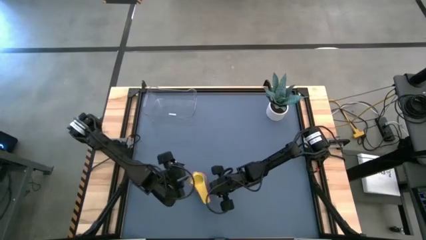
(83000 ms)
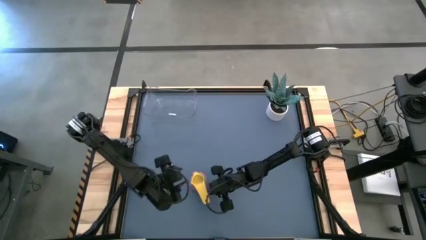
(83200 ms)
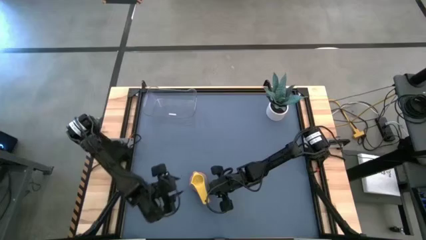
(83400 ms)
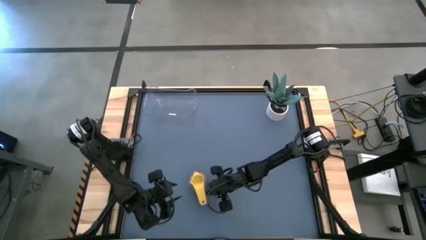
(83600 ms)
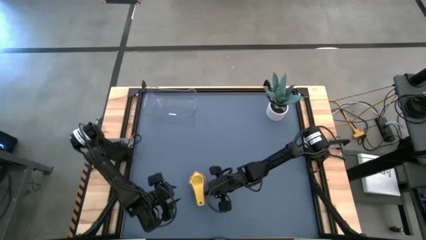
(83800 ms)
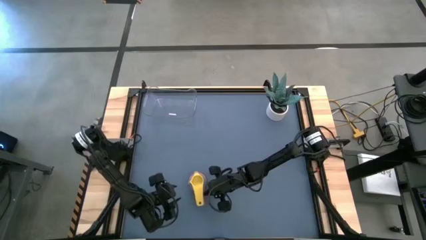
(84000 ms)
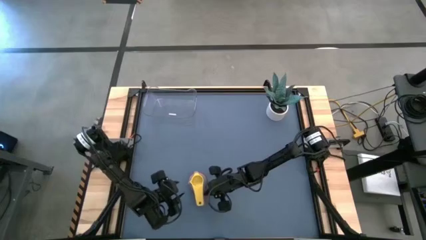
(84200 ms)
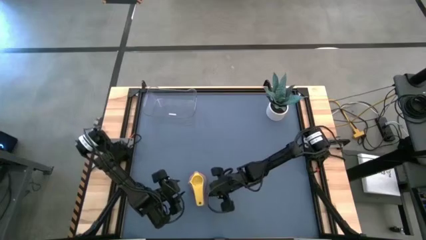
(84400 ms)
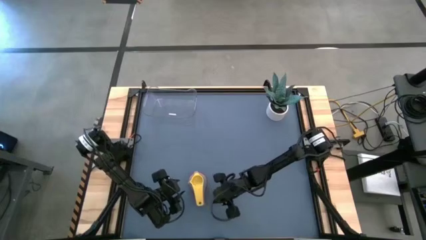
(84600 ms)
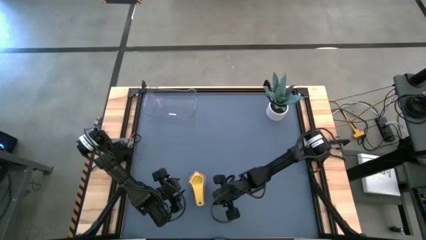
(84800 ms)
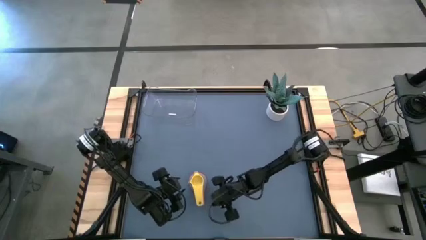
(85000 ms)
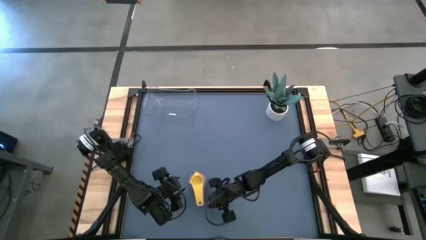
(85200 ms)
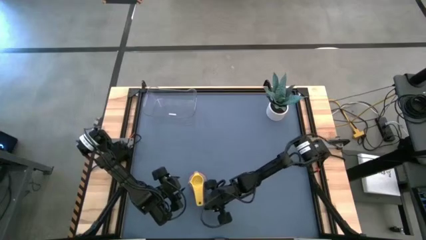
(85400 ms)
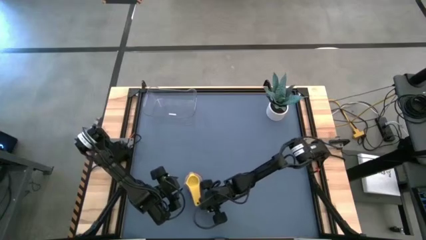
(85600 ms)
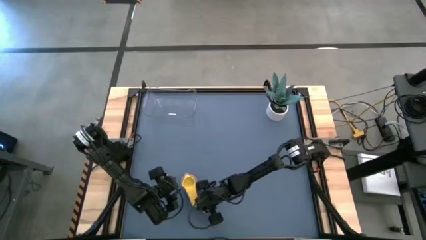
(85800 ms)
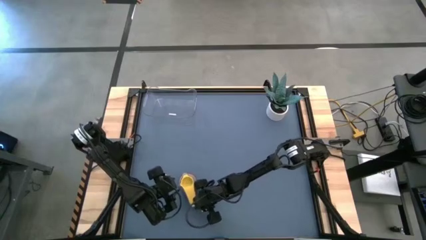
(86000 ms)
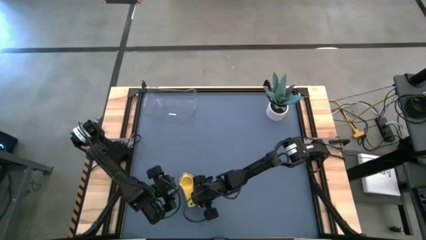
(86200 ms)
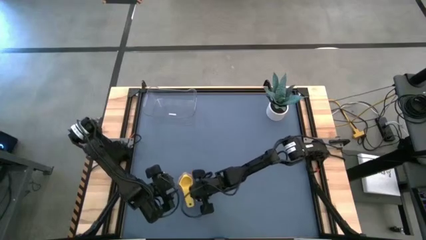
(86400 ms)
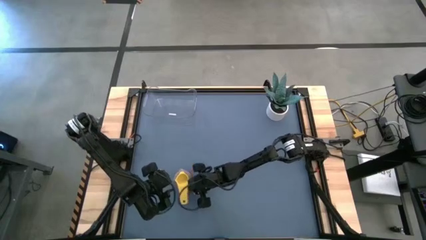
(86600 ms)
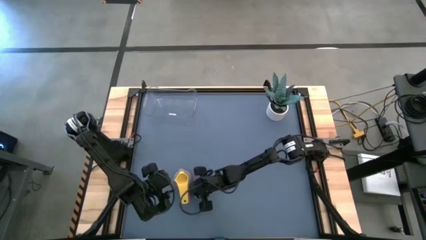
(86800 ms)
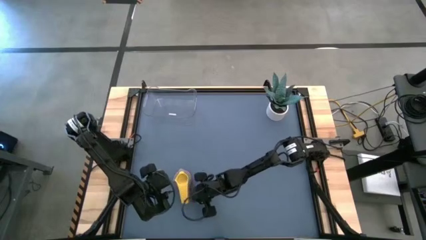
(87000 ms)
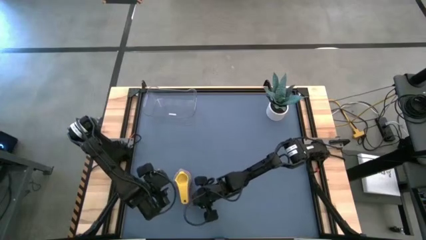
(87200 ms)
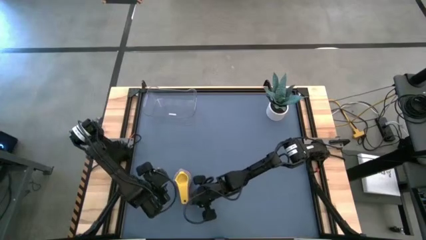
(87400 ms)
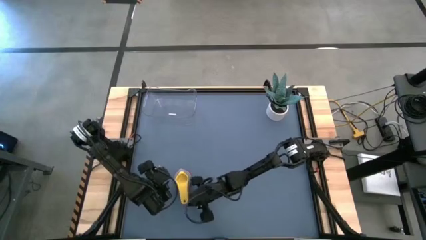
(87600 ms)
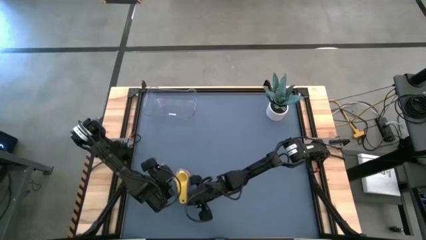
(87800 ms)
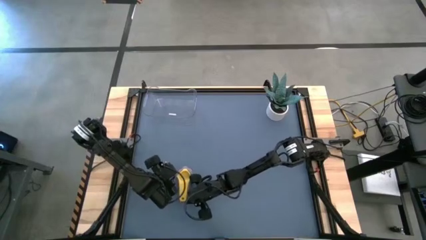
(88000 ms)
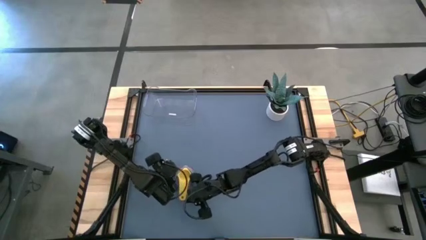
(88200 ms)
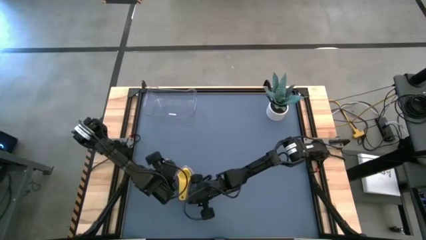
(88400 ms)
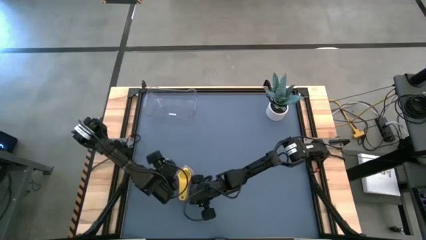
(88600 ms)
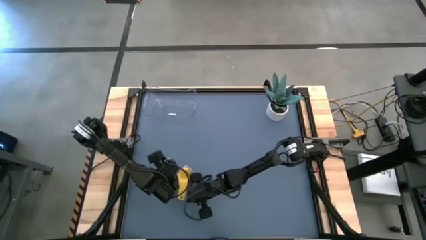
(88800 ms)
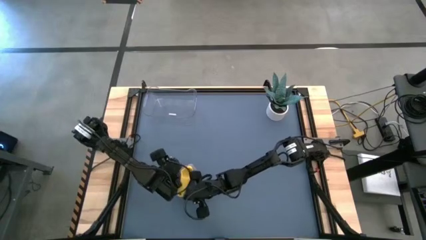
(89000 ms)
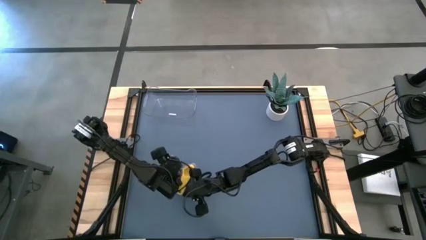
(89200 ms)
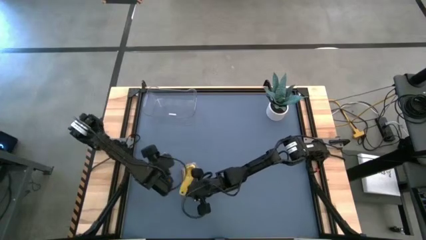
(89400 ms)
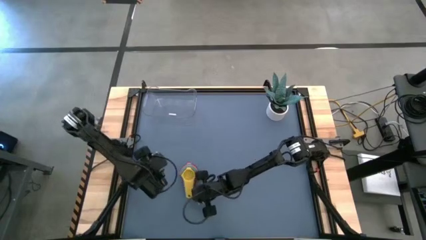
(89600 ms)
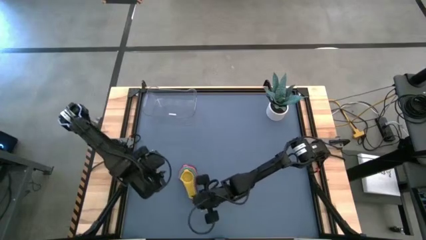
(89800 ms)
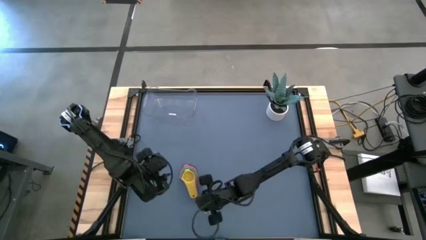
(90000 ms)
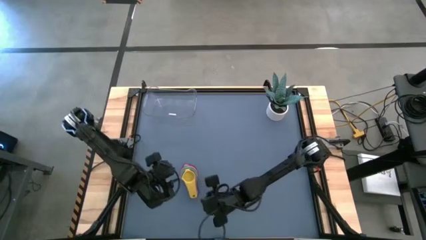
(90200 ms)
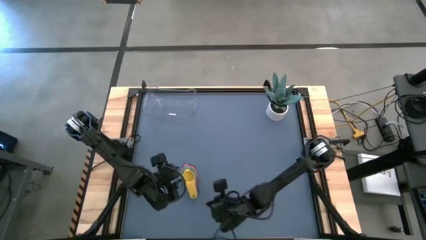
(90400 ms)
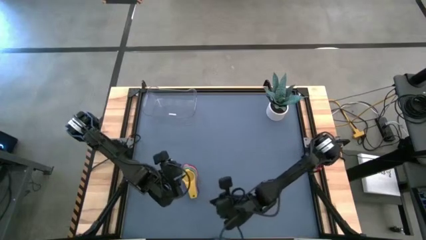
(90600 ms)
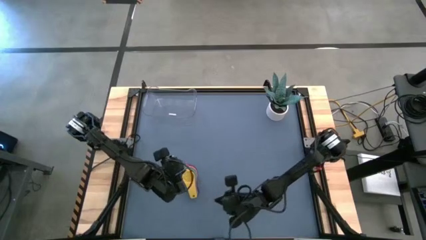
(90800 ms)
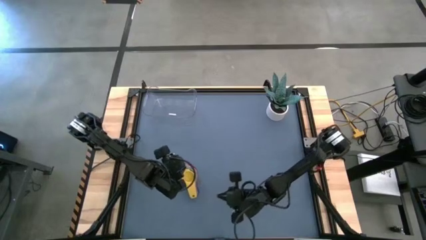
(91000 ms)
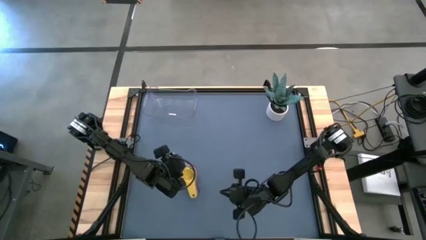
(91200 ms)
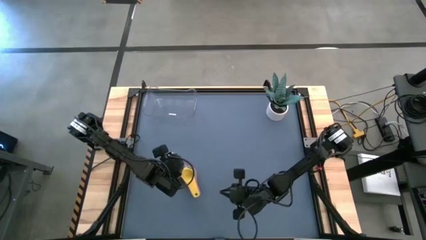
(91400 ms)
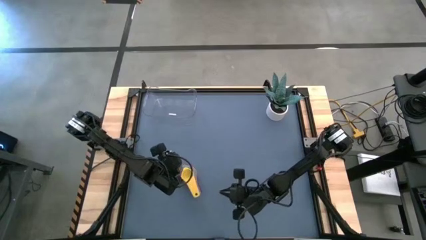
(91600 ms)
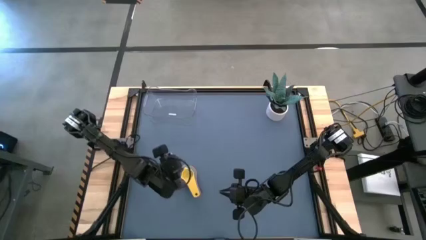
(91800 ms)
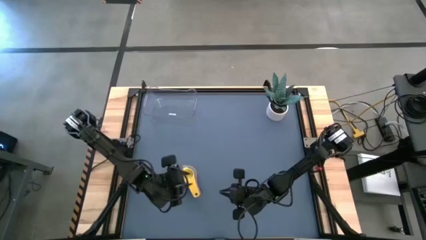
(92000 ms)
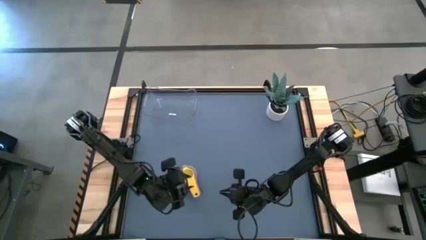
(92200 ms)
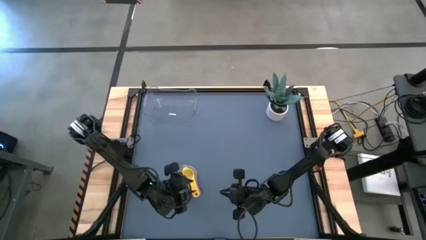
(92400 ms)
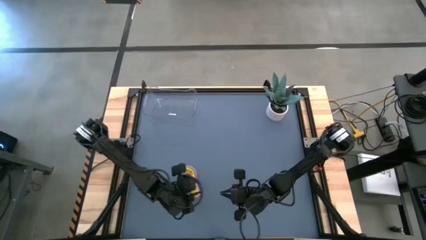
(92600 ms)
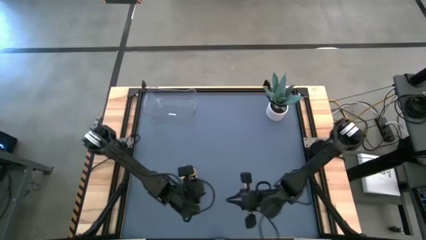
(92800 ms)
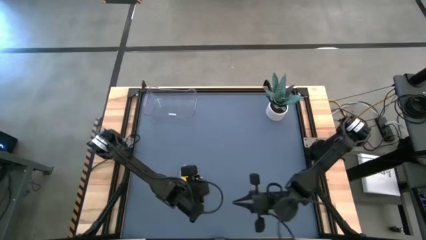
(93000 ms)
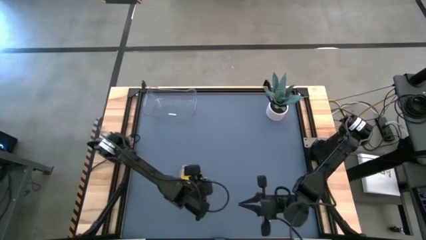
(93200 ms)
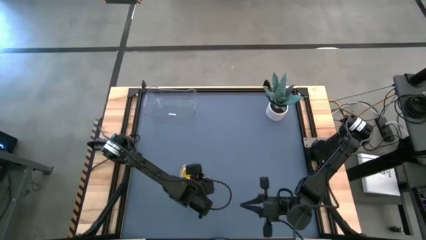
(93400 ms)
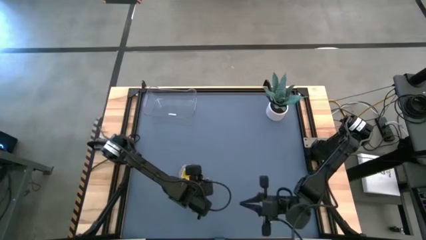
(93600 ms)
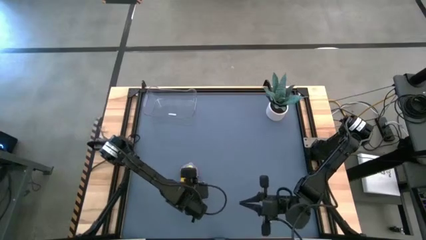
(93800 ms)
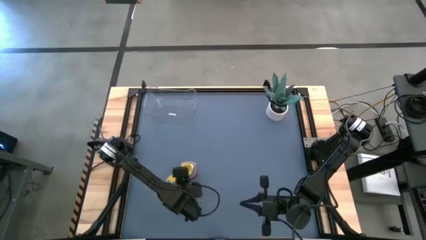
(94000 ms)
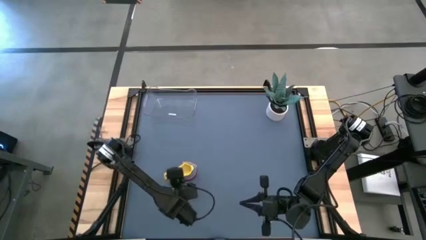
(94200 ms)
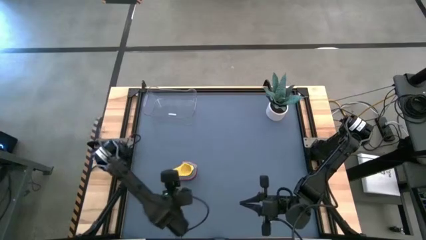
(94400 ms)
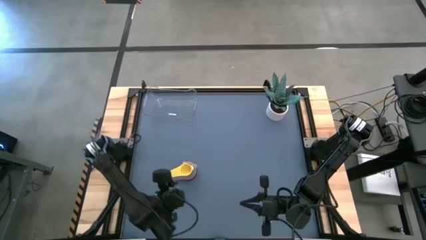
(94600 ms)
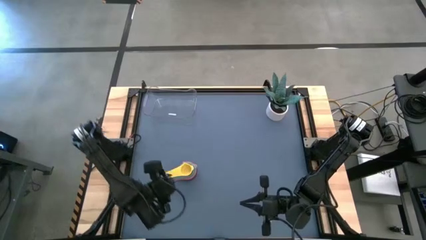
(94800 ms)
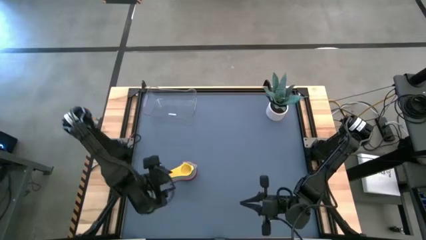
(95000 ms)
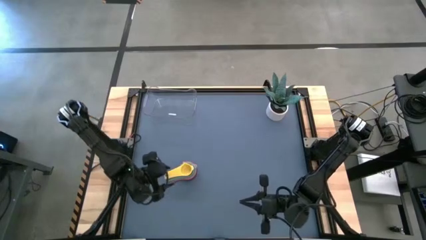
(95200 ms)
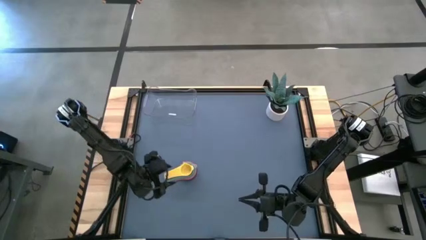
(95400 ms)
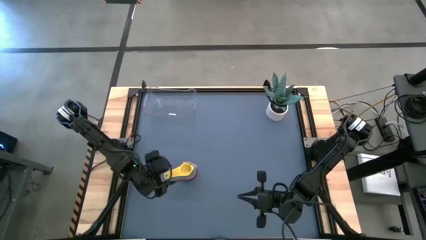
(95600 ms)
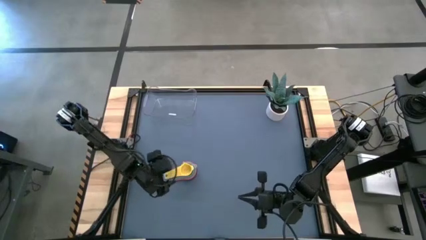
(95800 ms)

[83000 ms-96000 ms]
Task: Nest measuring cups in basket
Put the nest measuring cups into the transparent bin

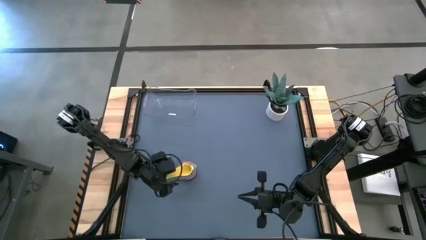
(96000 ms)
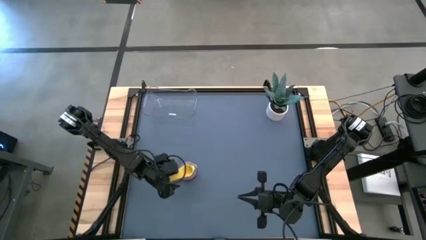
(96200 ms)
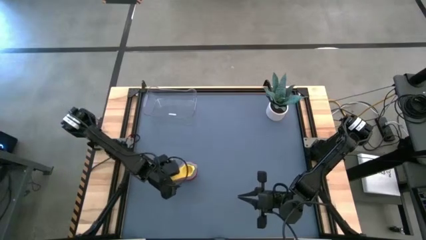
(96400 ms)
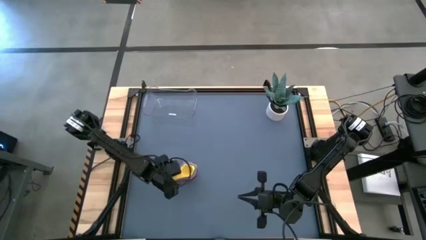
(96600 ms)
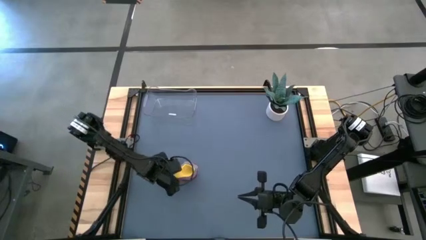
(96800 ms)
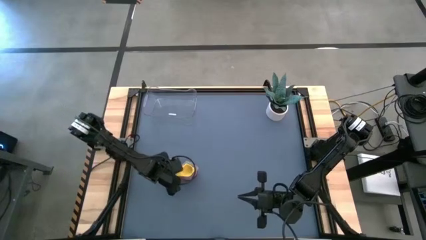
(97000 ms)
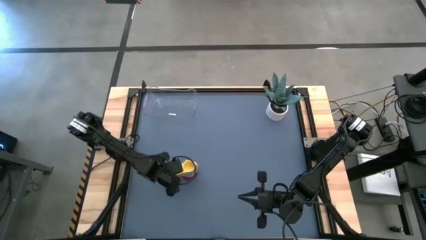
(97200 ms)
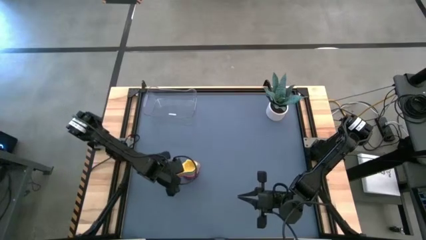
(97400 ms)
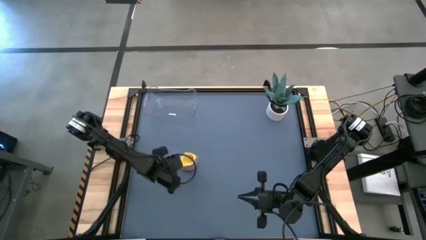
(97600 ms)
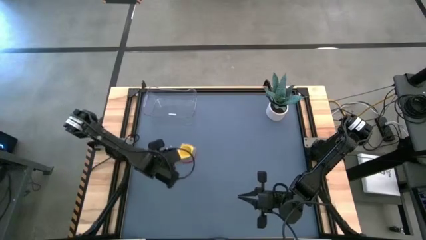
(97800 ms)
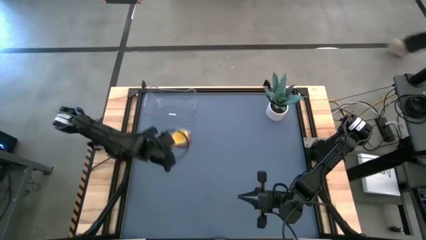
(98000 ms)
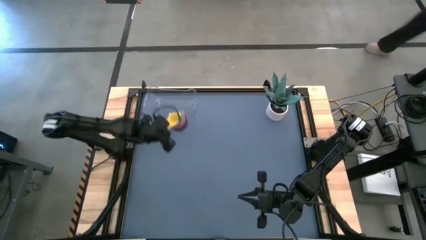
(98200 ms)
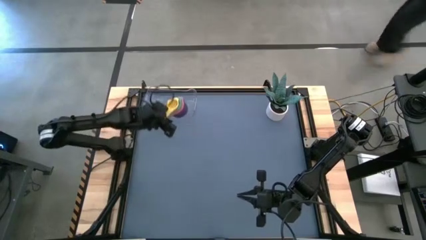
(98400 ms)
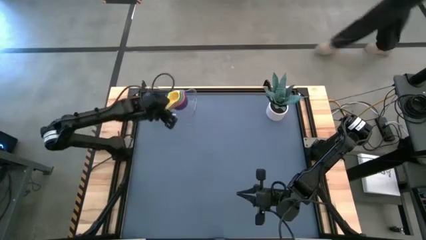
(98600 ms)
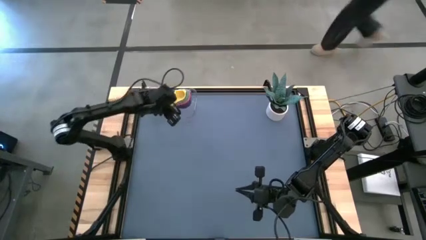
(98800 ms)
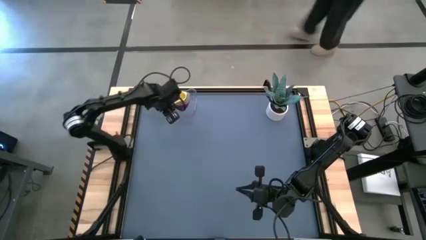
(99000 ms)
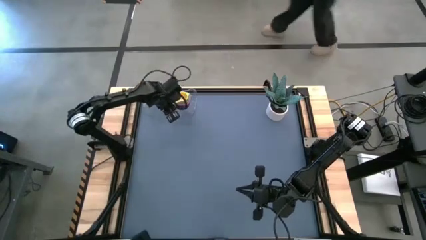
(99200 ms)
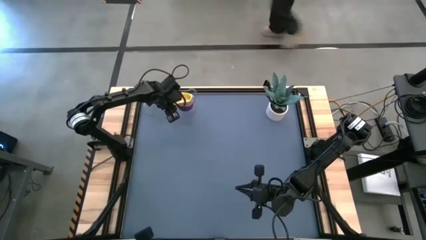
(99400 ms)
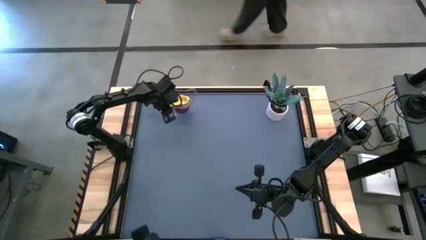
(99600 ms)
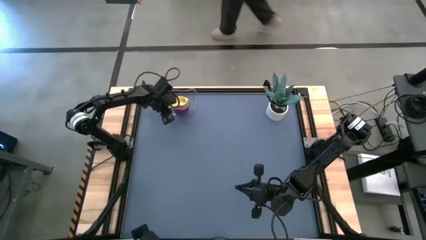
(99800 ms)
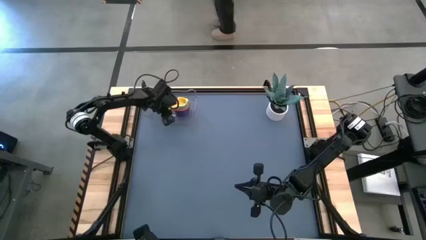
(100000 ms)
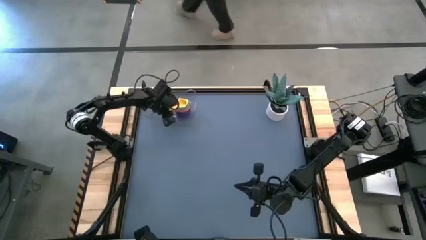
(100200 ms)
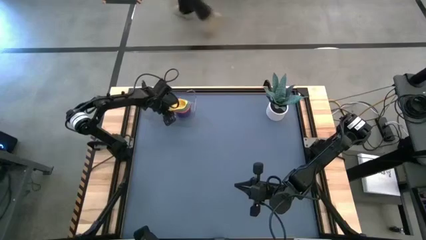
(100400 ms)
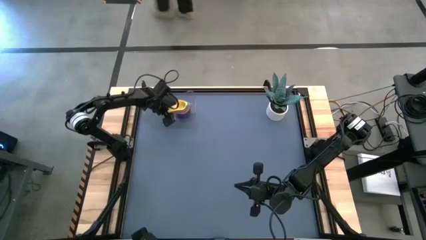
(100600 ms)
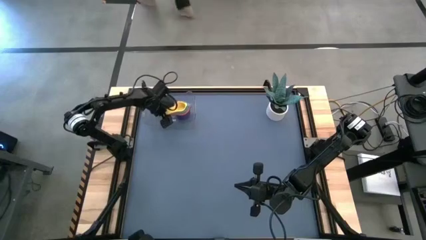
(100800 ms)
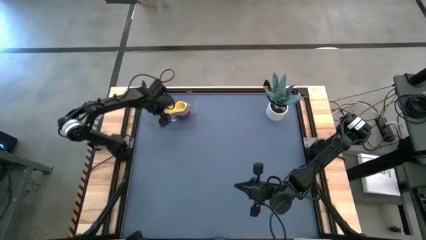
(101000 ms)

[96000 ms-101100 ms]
Put the nest measuring cups into the transparent bin
